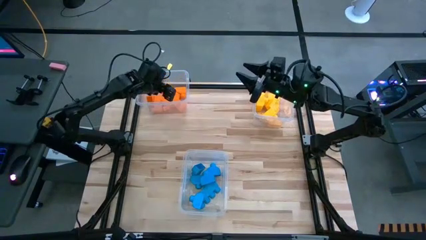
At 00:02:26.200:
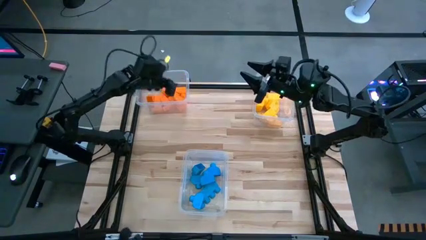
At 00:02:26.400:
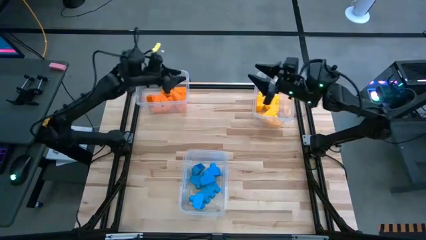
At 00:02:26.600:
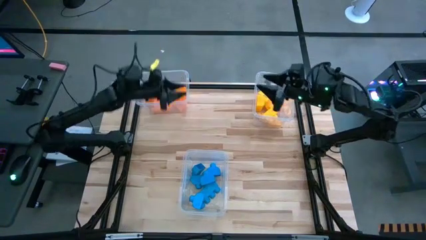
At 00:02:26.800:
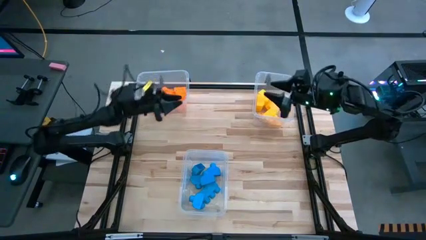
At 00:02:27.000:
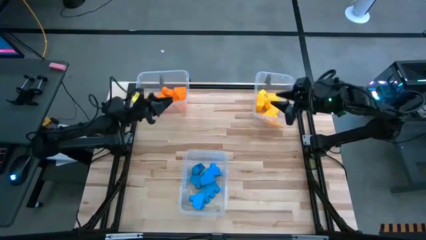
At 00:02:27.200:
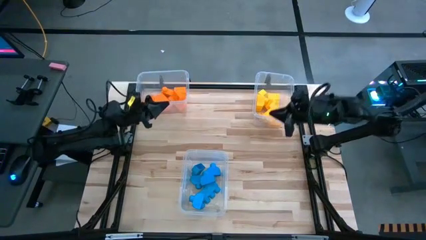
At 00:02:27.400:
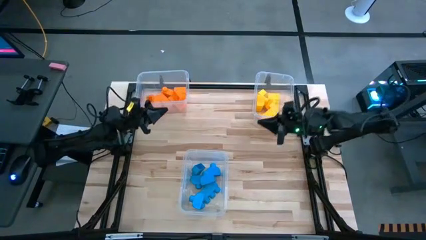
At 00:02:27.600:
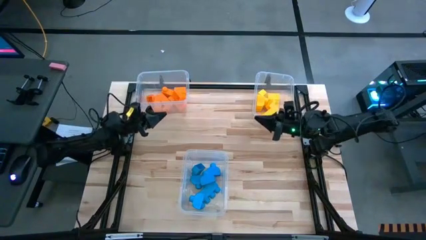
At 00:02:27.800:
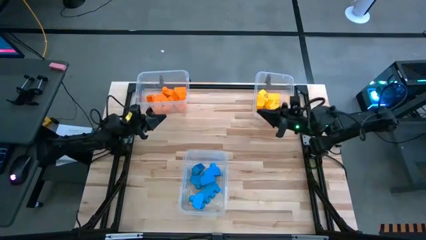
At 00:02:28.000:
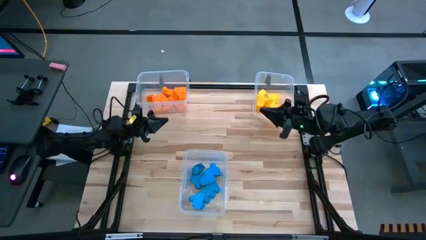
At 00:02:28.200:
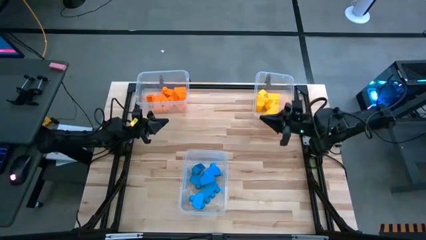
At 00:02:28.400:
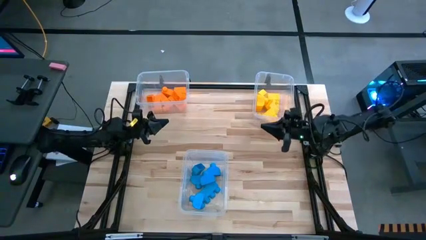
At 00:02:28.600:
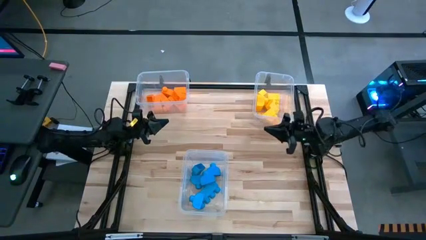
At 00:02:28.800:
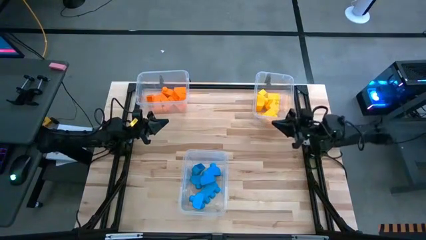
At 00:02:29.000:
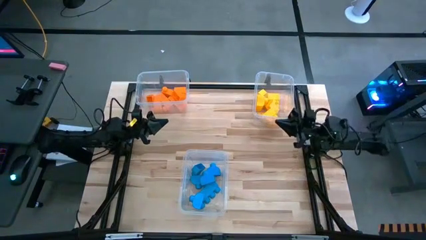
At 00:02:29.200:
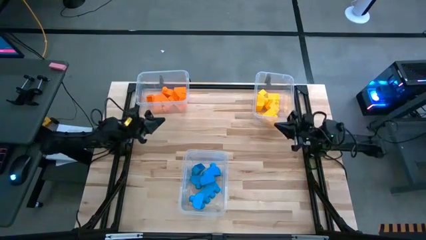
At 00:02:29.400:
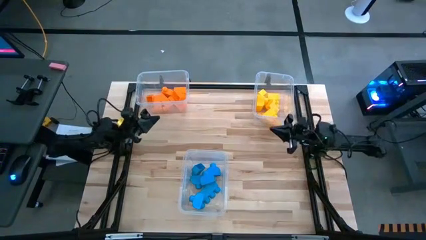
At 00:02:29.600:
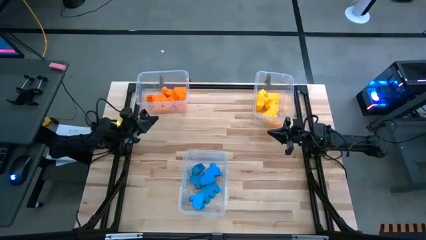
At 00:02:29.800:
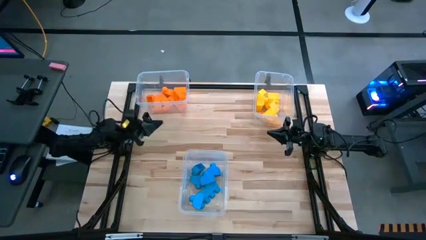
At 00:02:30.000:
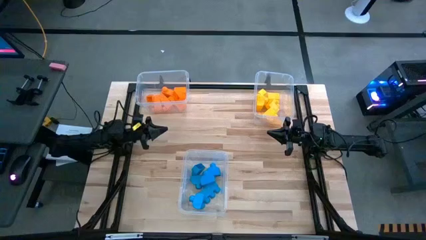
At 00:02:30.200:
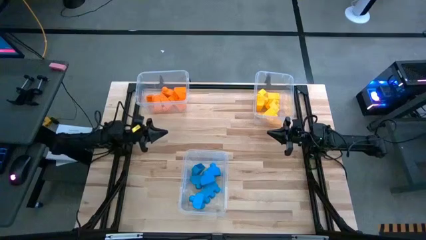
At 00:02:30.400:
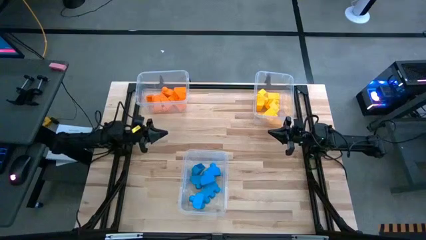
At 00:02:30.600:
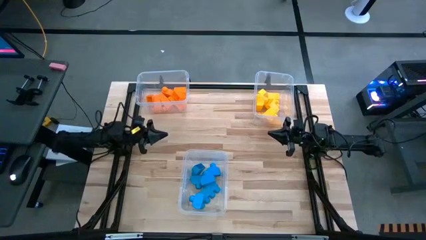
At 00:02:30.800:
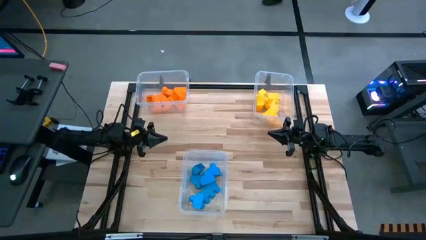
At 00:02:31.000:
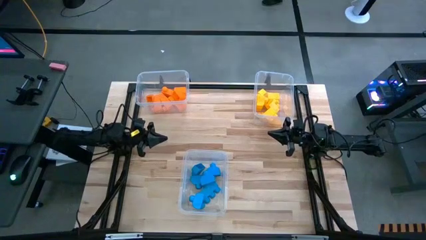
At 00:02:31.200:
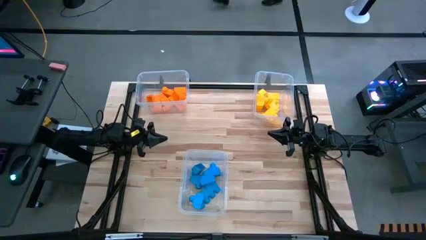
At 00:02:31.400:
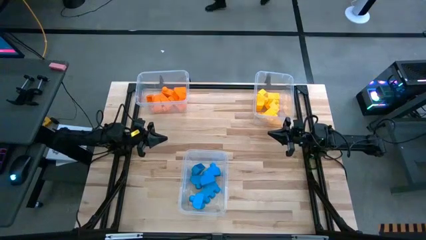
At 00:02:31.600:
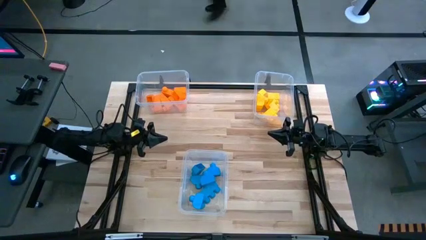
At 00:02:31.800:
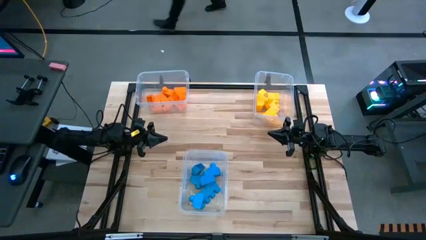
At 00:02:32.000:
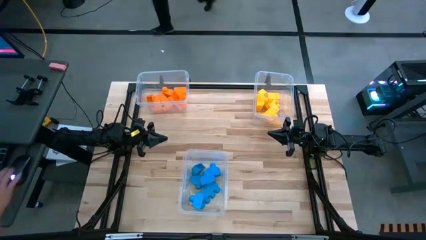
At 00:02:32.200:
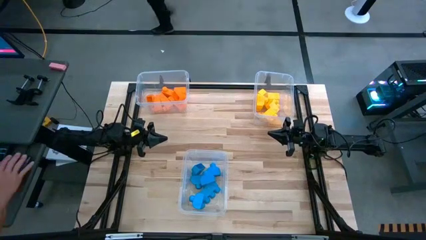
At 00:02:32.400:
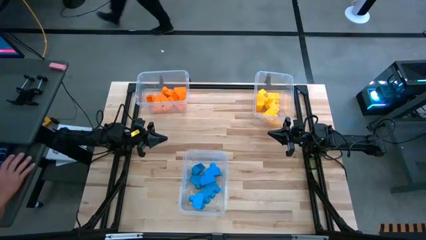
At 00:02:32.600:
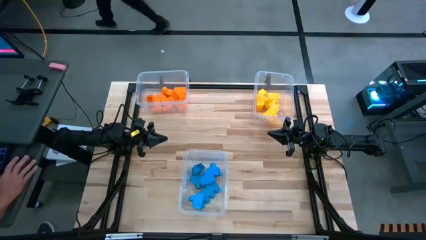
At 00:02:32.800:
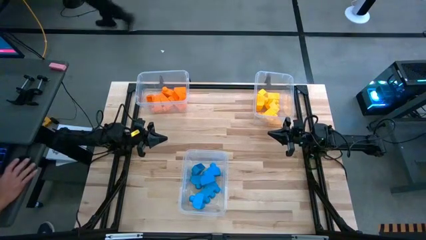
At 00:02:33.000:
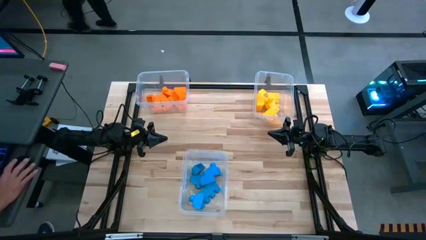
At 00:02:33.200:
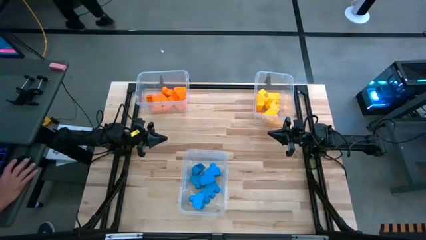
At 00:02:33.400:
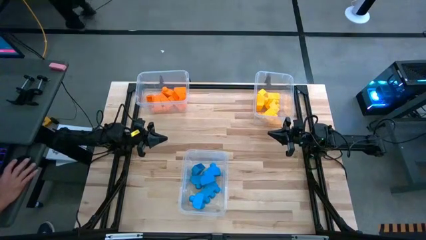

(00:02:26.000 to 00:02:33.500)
Task: Sort blocks
Return to Home Position

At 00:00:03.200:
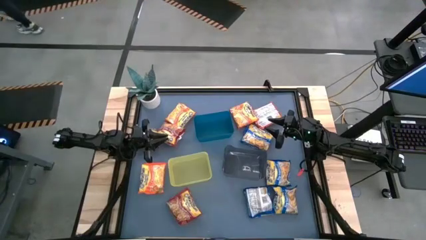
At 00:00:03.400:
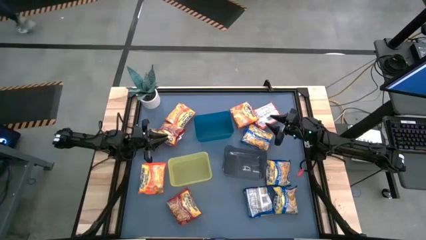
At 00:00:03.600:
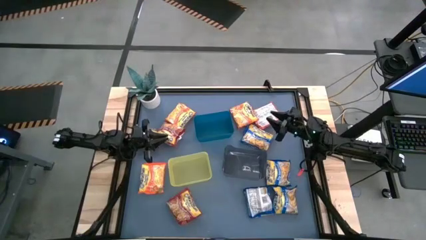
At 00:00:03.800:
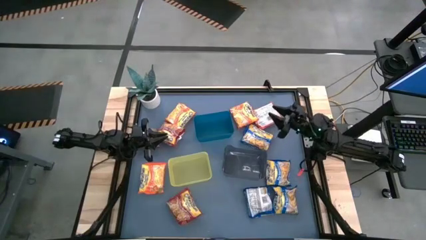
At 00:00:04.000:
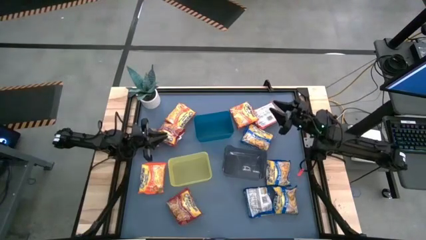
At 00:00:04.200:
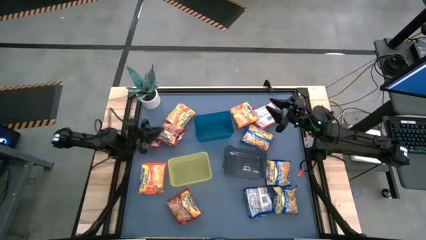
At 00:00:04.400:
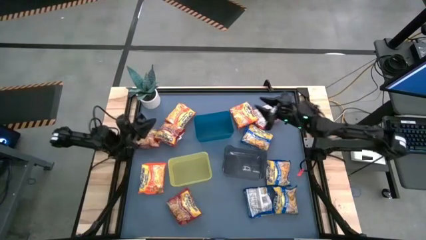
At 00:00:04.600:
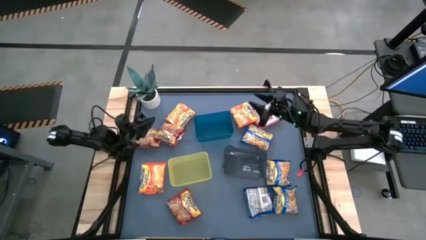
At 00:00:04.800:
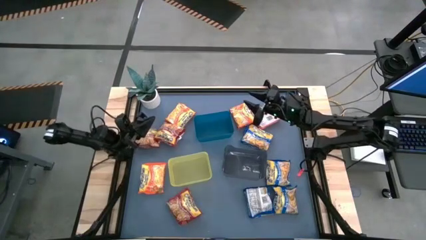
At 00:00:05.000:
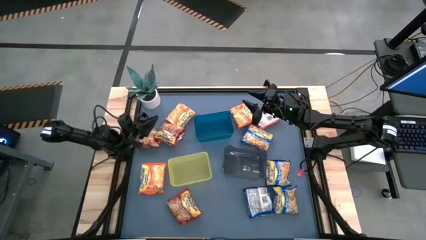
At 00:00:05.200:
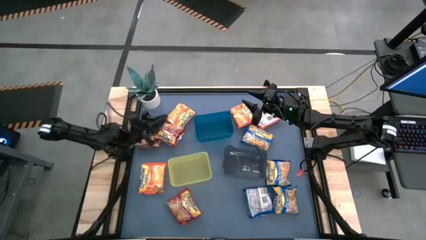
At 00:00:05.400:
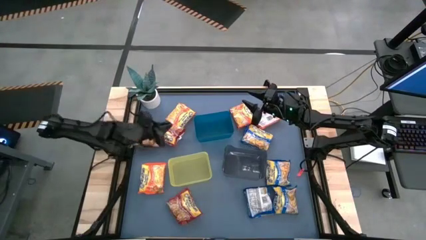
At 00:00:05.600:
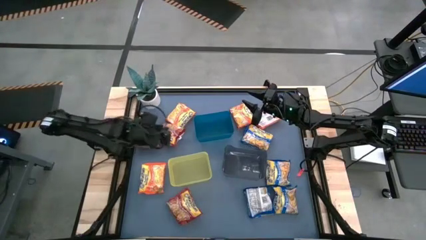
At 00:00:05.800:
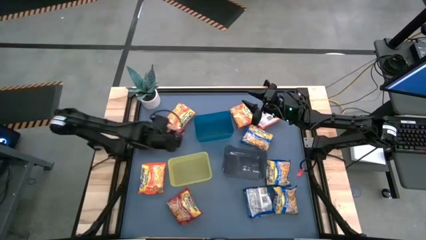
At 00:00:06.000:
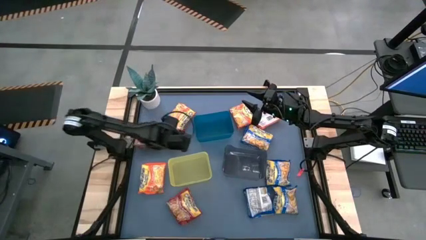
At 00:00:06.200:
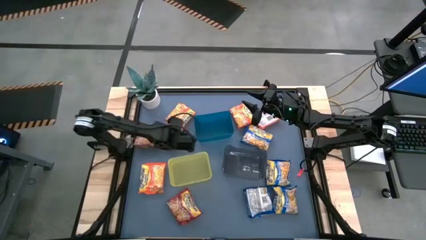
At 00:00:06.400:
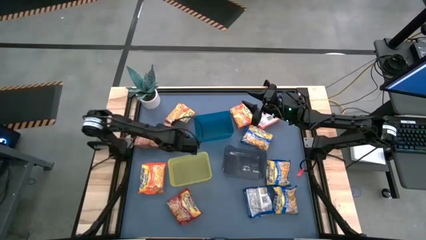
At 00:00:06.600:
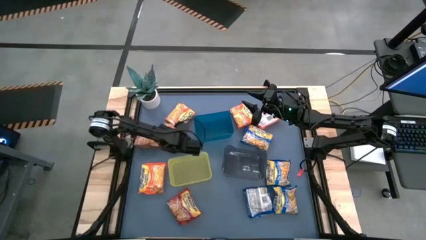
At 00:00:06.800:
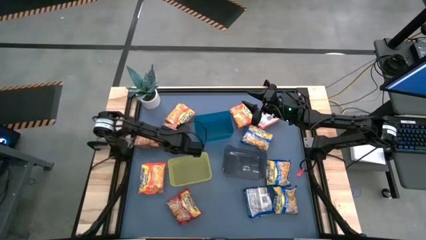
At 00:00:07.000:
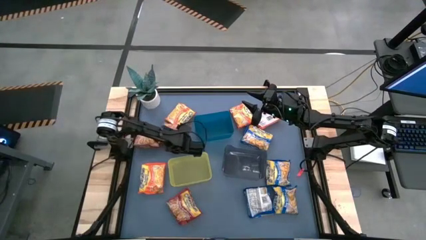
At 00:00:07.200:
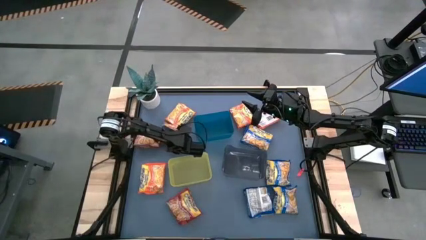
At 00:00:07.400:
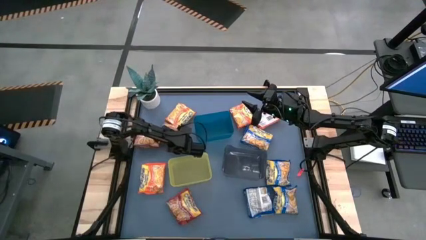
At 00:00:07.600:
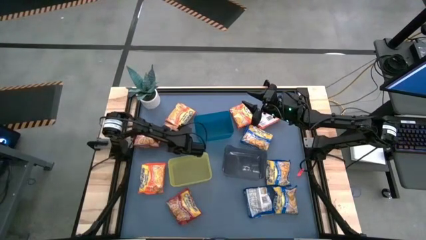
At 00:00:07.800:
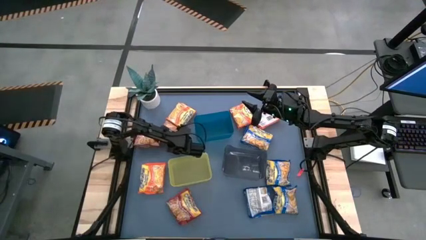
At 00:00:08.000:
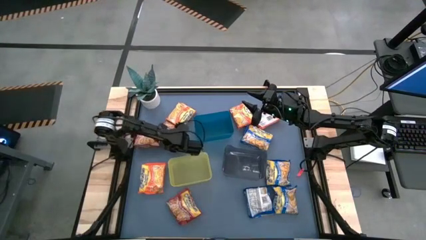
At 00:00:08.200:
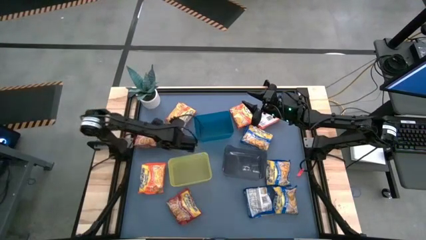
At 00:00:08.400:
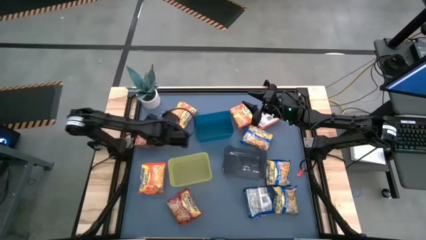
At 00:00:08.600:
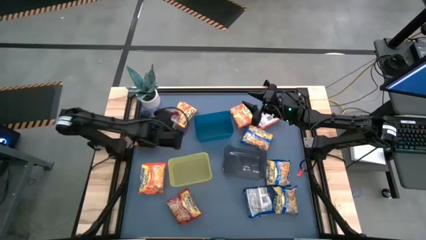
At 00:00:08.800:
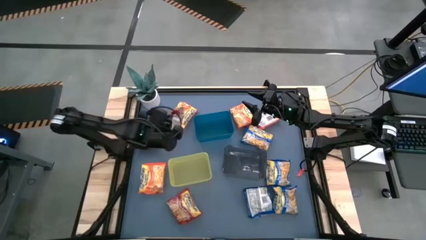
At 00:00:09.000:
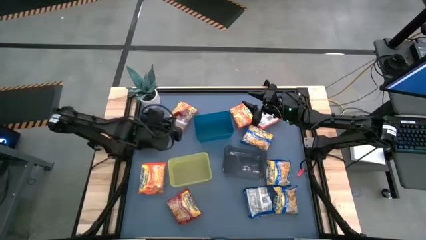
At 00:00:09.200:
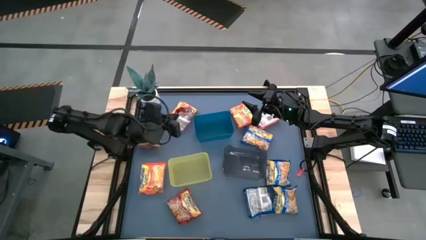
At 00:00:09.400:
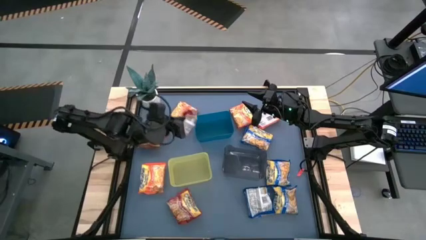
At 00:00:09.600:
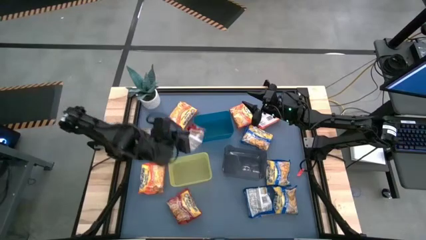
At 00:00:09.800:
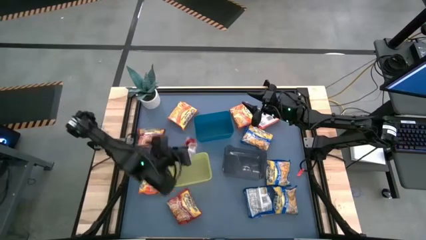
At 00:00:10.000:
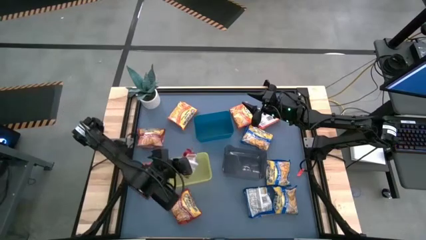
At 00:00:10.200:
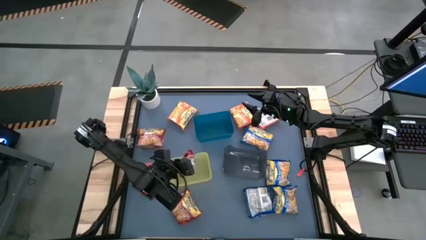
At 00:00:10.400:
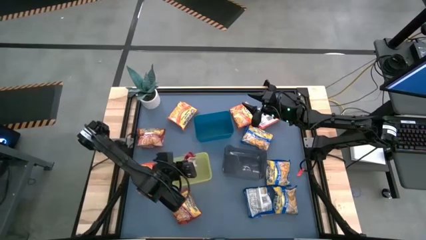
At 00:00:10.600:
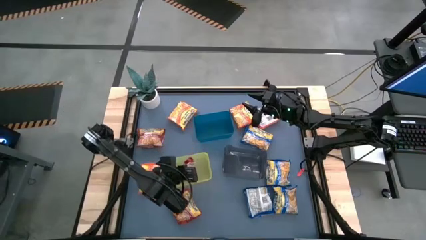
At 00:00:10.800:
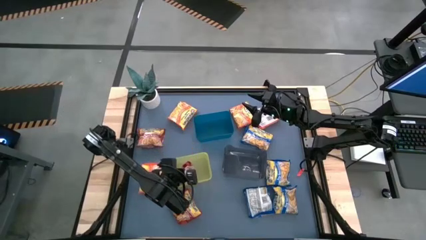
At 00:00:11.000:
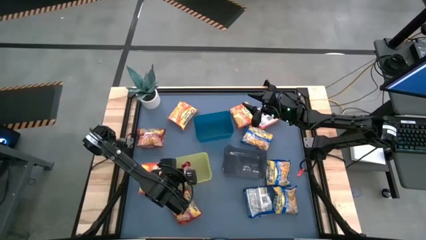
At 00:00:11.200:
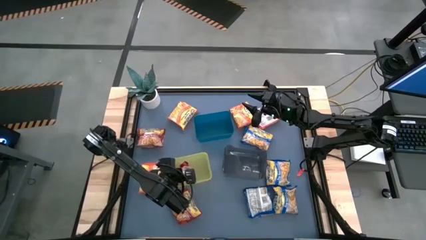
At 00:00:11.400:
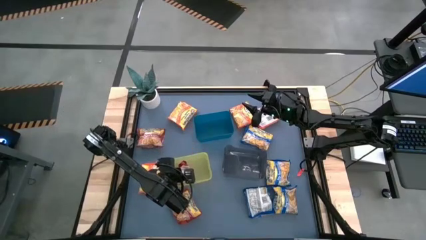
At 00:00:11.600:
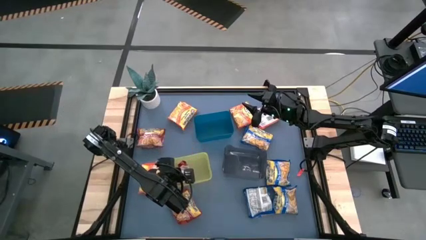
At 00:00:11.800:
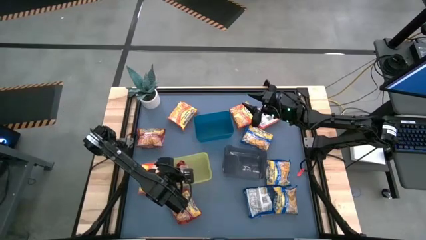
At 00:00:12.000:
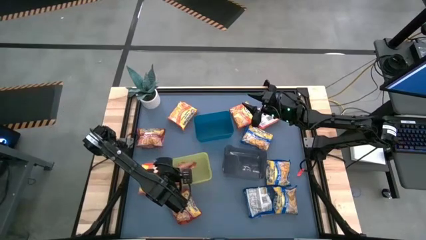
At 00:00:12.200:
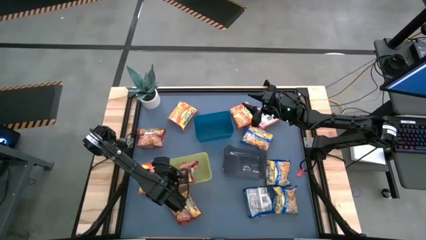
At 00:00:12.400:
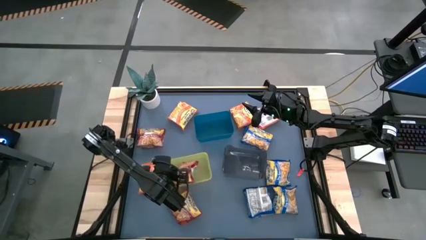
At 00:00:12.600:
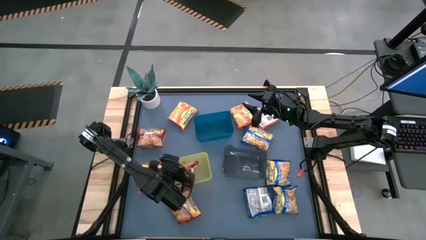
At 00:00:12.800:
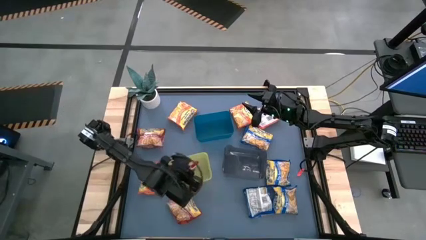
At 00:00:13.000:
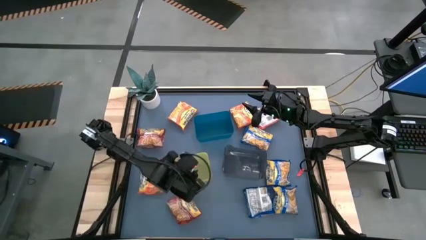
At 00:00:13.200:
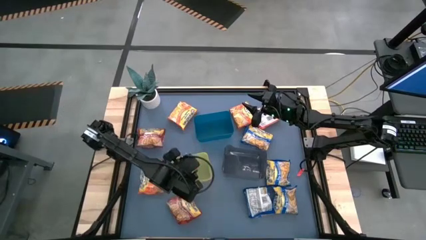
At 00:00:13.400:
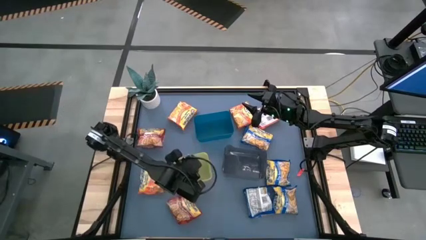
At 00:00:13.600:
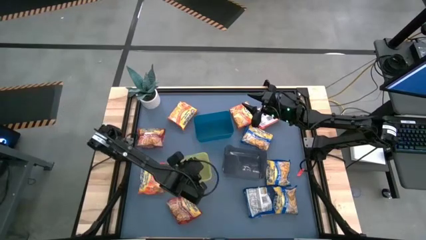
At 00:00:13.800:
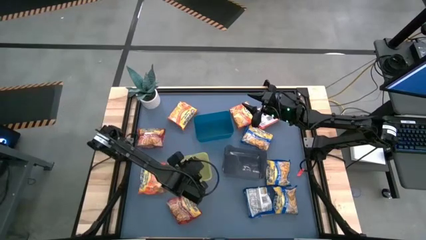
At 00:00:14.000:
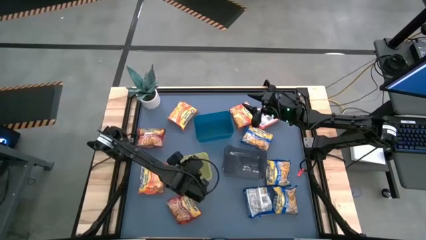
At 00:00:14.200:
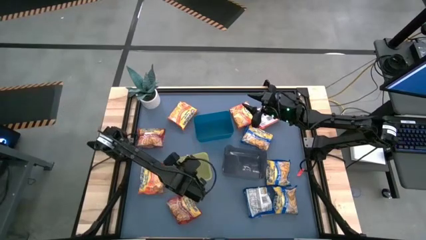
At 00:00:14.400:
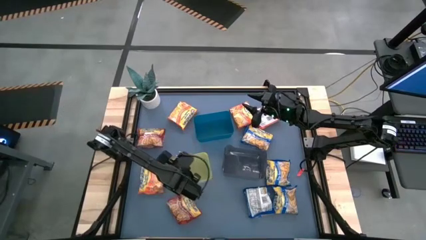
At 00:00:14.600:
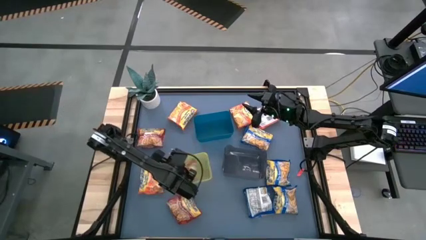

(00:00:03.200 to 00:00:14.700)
Task: Sort Maruchan noodles
Put the red noodle pack into the yellow bin
